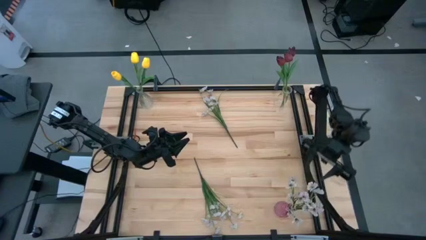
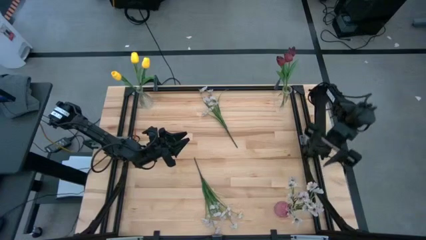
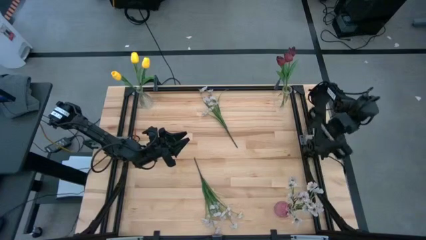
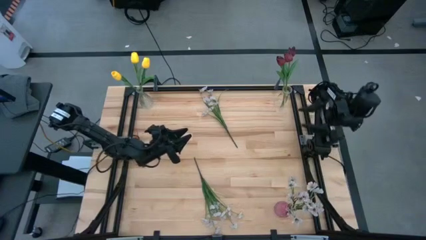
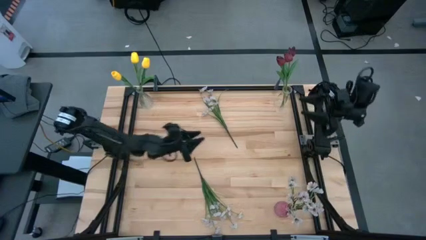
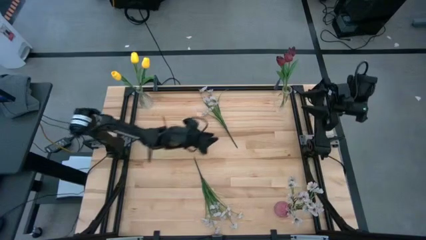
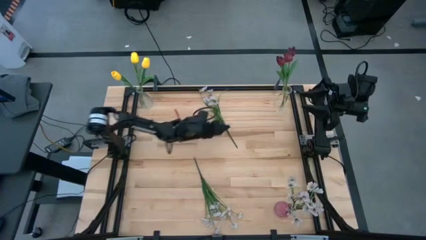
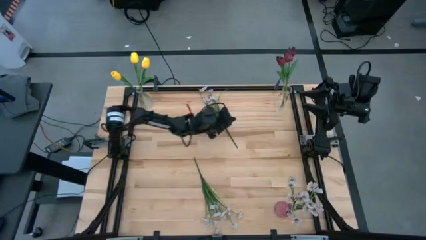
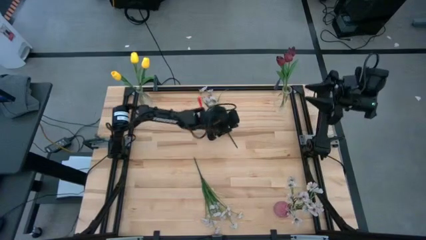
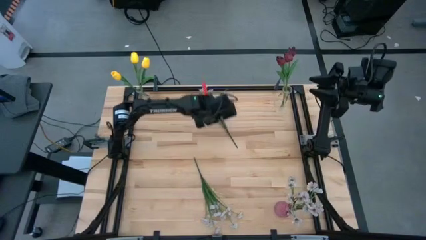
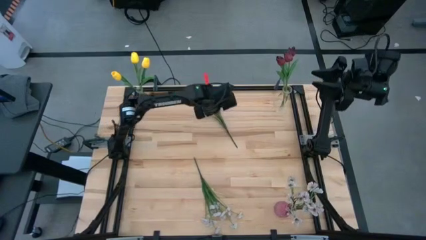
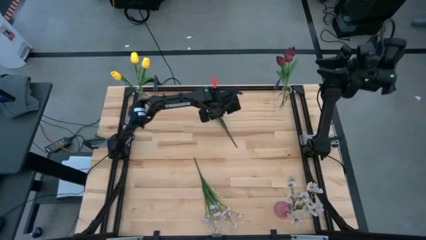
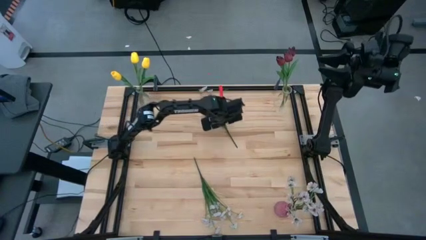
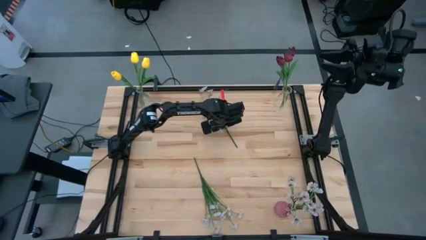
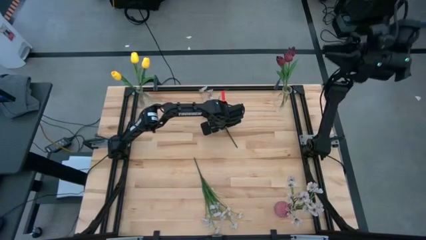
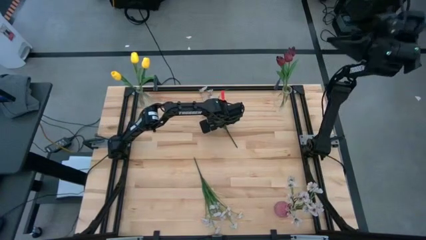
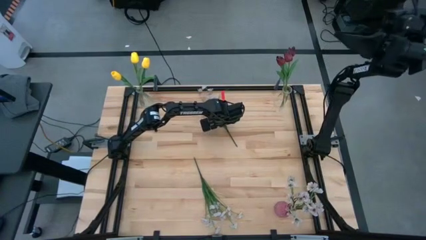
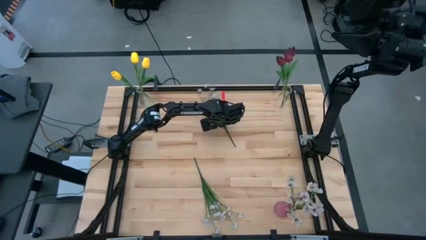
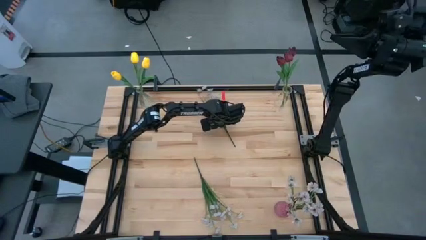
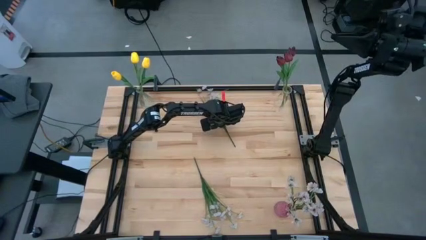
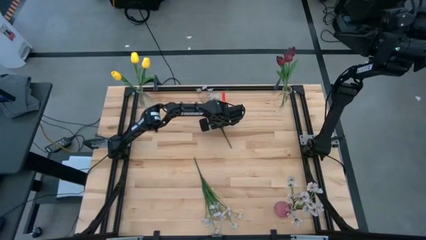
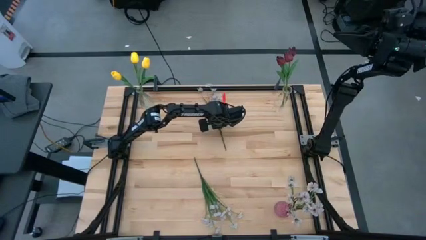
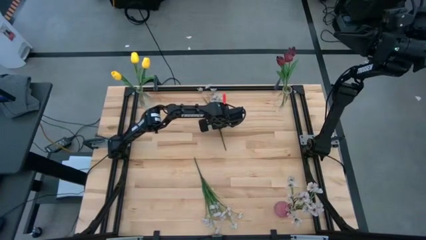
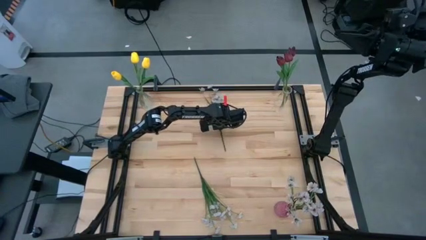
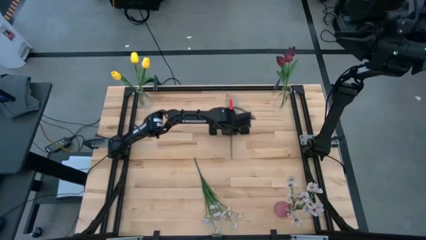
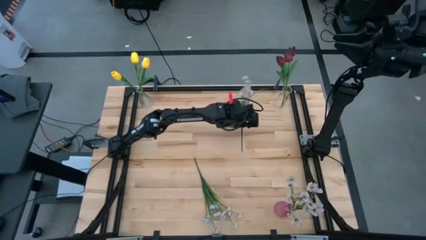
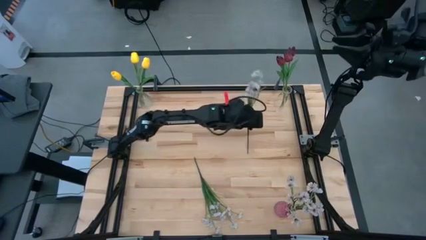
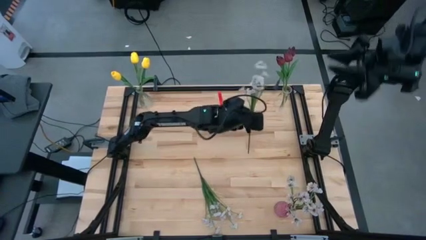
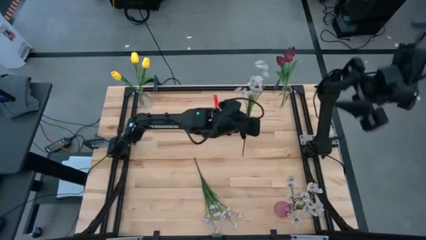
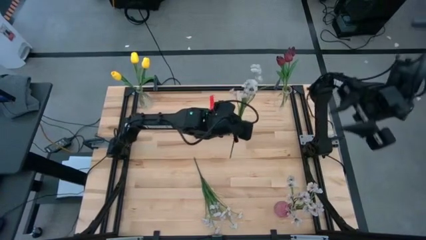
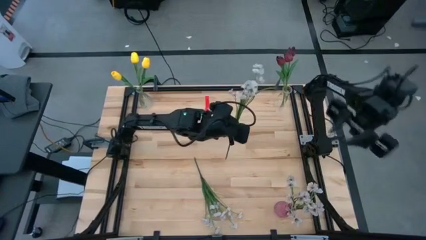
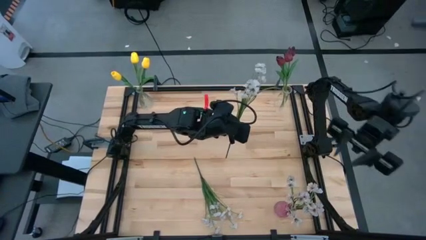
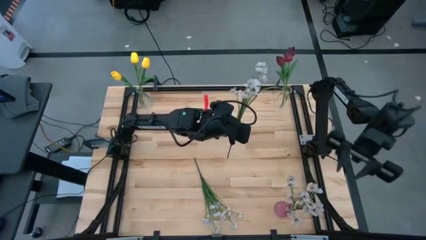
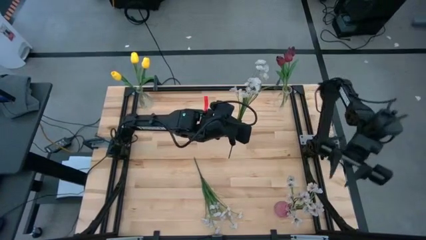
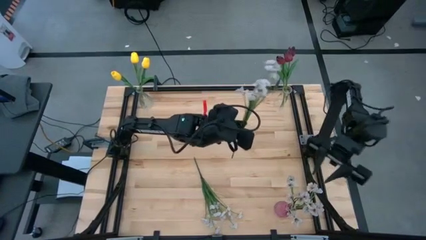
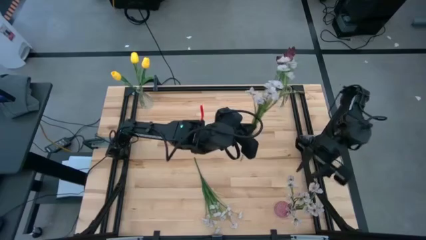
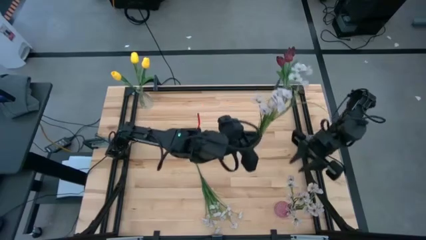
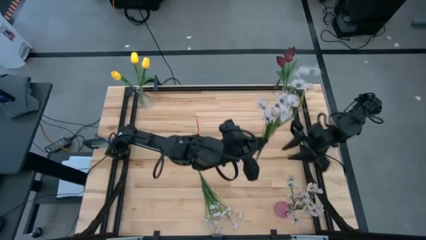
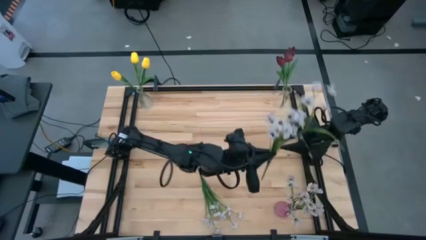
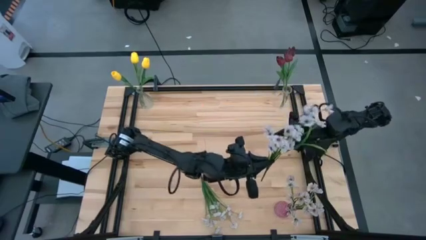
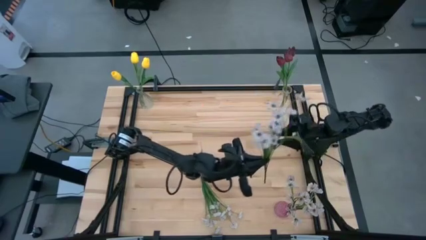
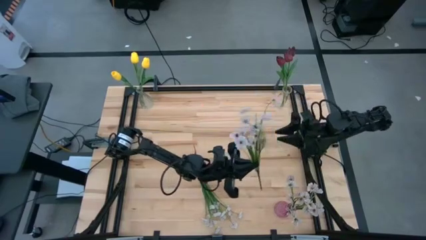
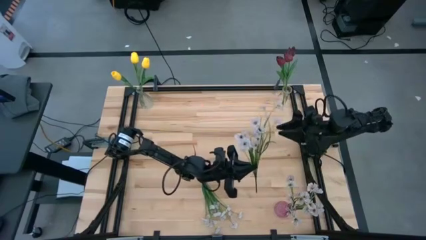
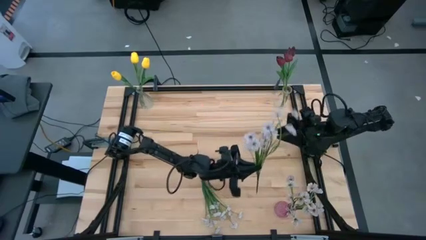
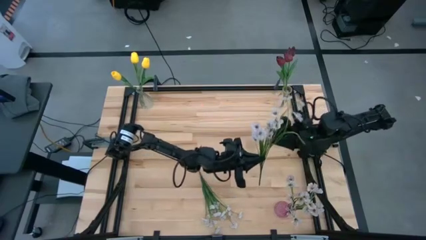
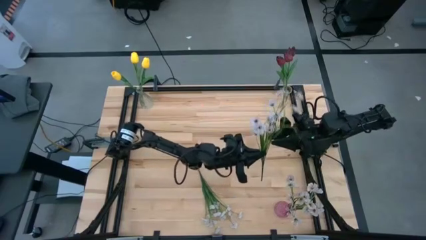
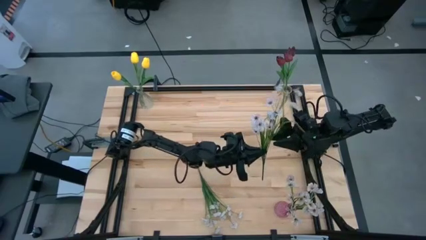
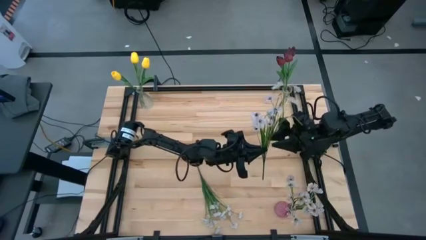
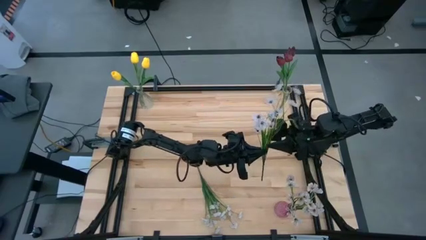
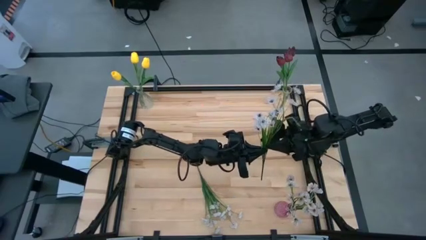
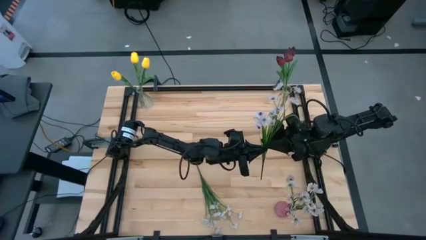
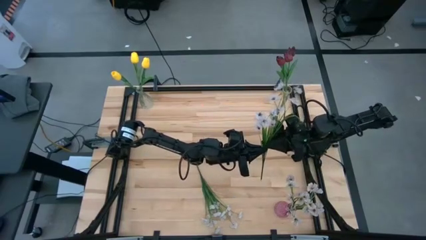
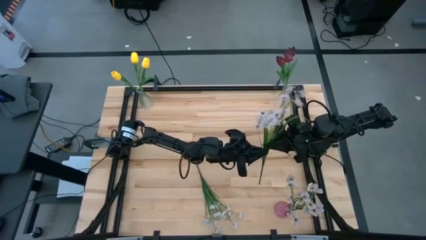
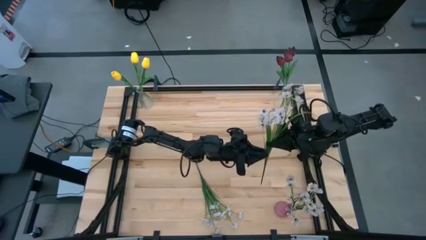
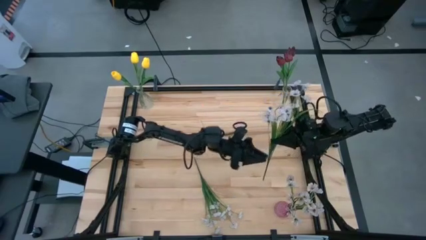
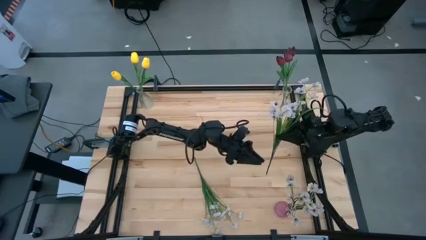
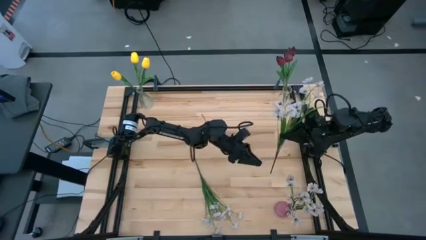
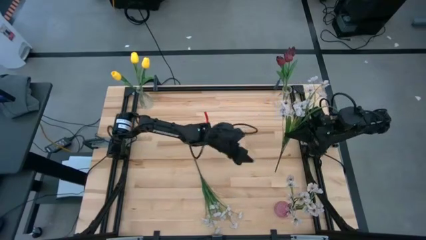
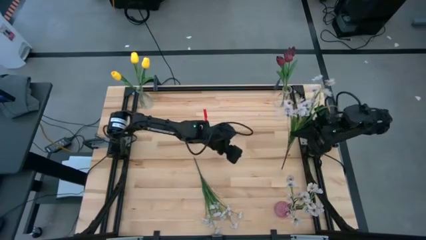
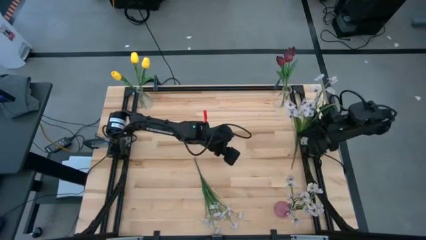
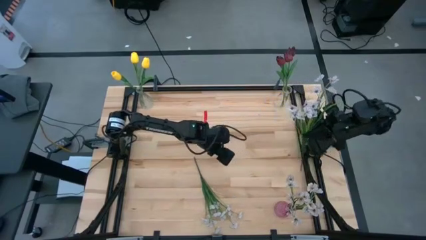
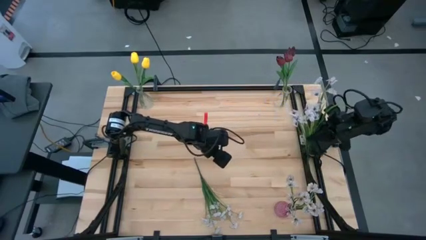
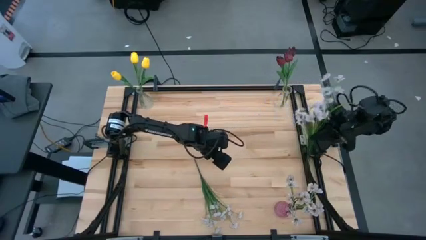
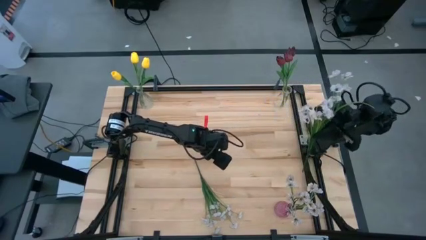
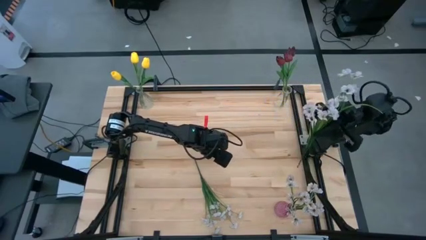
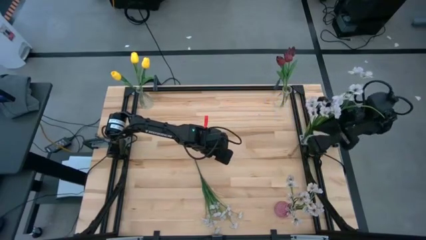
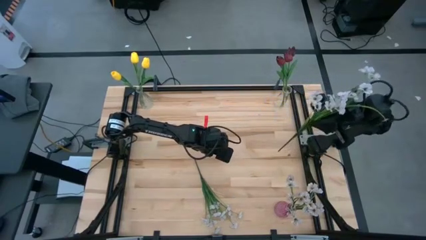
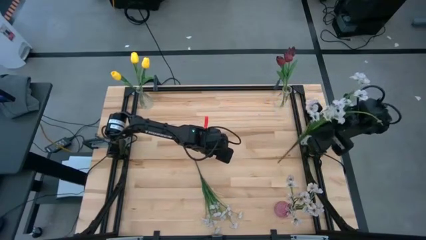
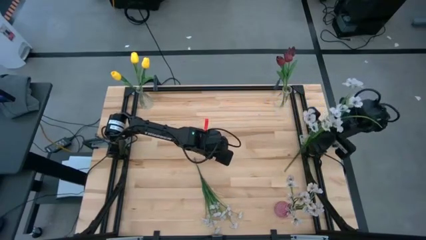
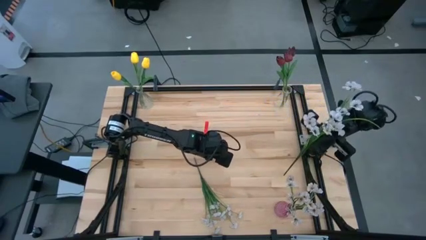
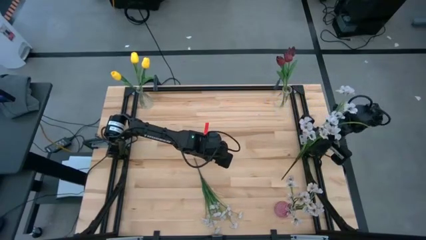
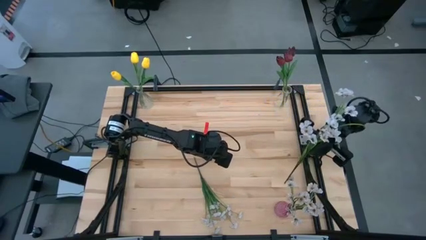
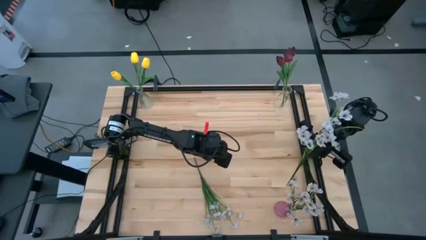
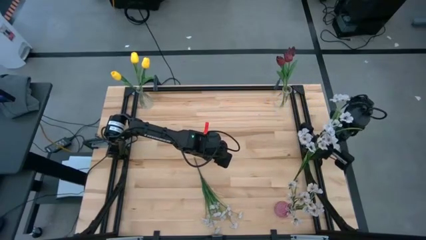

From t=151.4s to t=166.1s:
Task: Sort flowers into vase by color
Put the top white flowers into the purple vase
